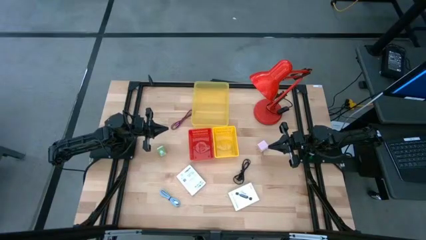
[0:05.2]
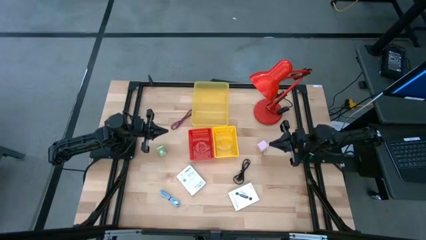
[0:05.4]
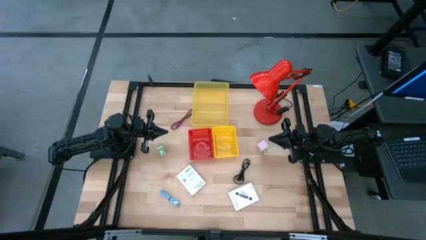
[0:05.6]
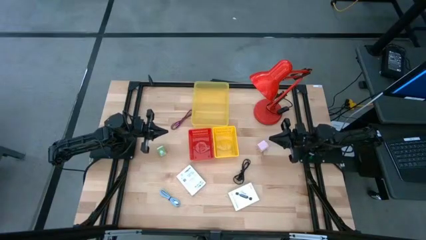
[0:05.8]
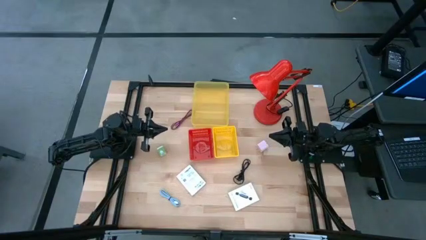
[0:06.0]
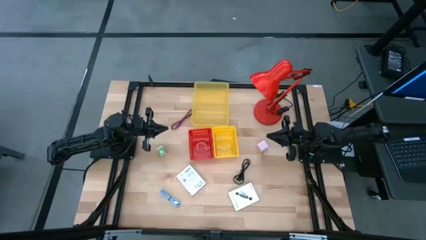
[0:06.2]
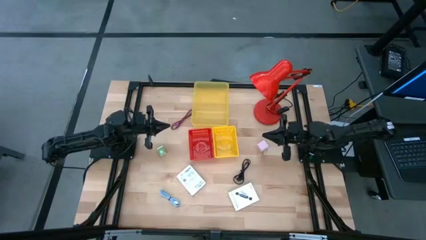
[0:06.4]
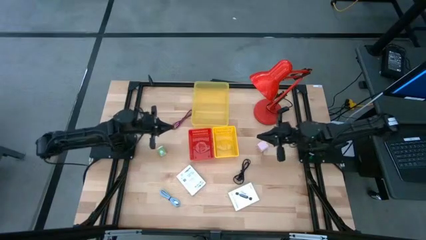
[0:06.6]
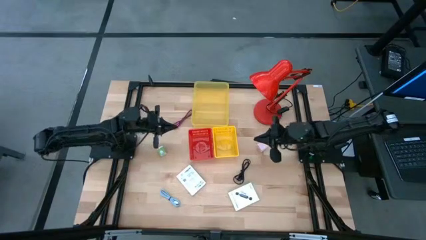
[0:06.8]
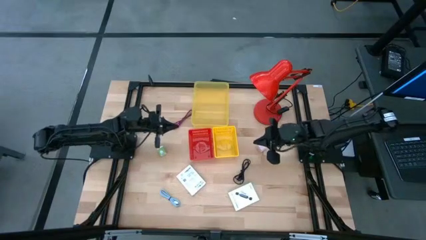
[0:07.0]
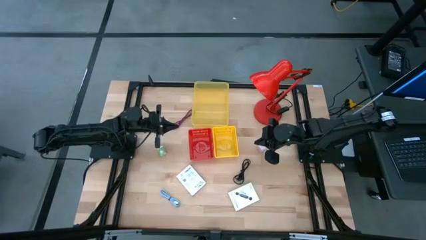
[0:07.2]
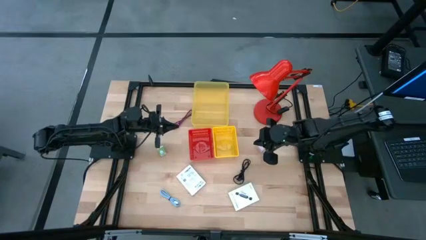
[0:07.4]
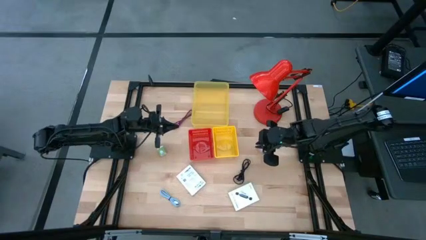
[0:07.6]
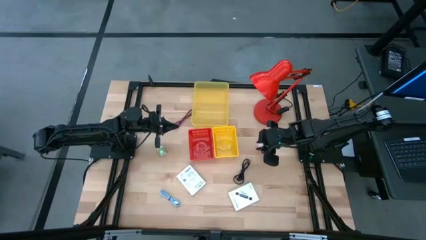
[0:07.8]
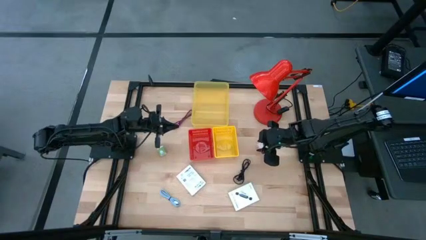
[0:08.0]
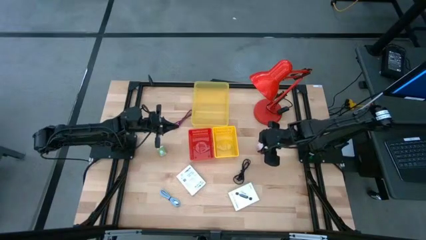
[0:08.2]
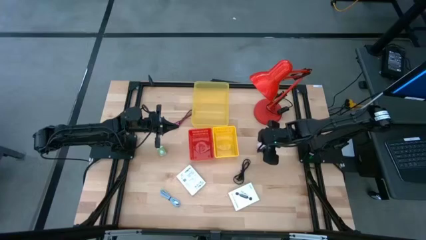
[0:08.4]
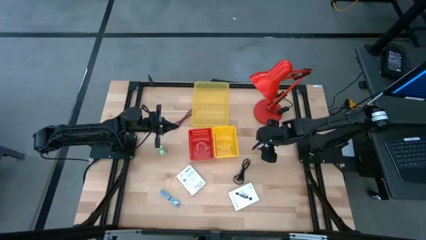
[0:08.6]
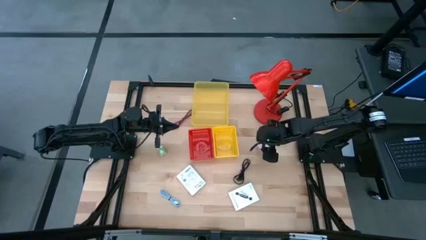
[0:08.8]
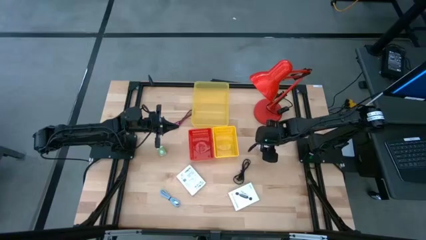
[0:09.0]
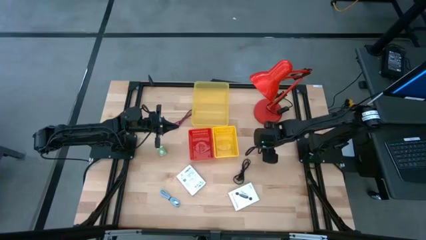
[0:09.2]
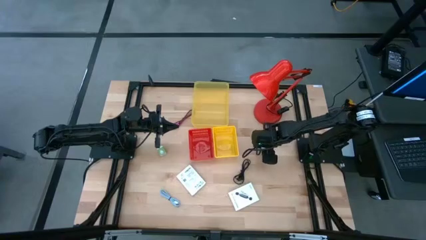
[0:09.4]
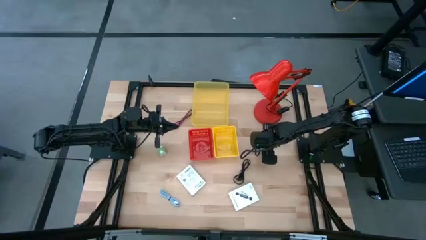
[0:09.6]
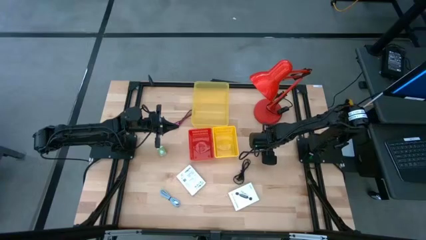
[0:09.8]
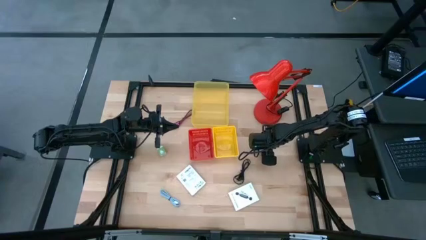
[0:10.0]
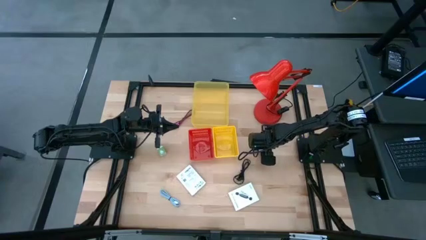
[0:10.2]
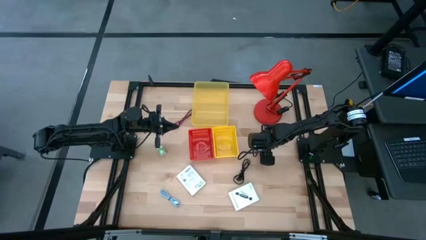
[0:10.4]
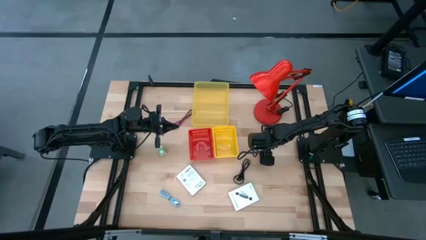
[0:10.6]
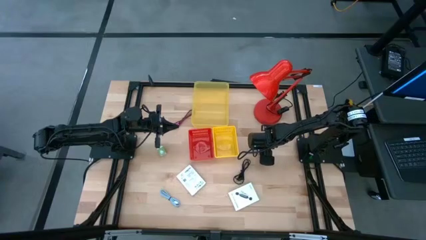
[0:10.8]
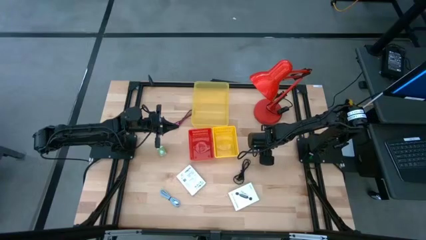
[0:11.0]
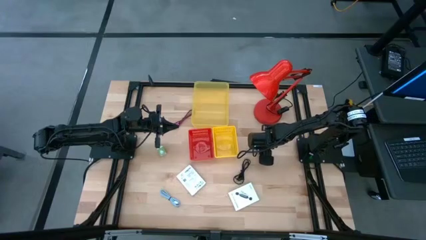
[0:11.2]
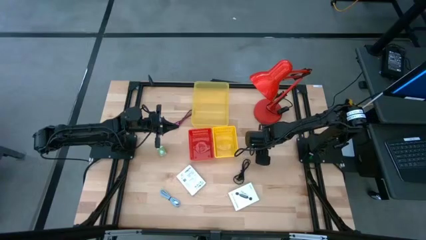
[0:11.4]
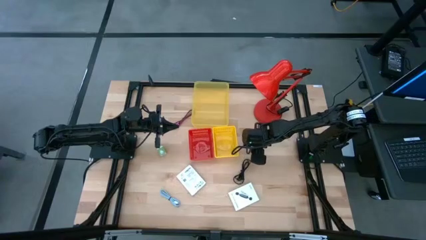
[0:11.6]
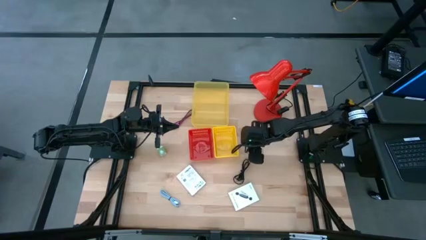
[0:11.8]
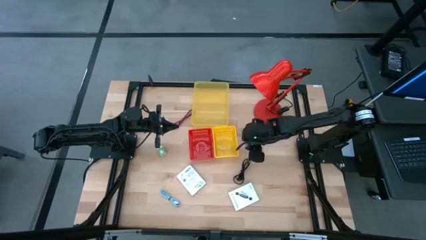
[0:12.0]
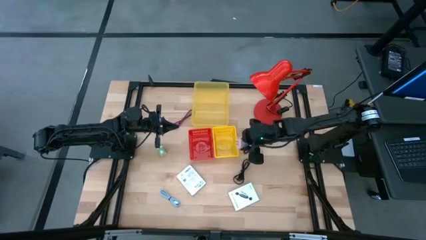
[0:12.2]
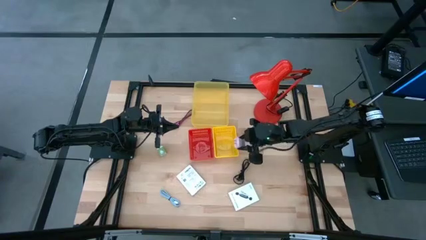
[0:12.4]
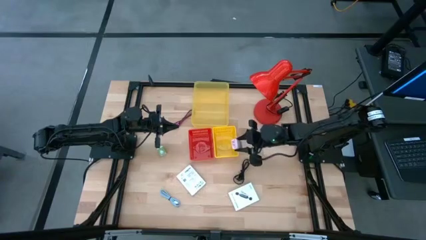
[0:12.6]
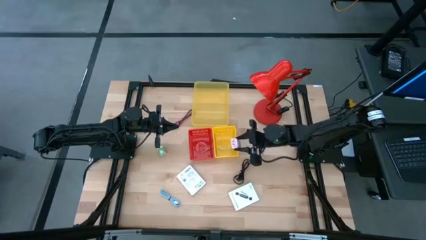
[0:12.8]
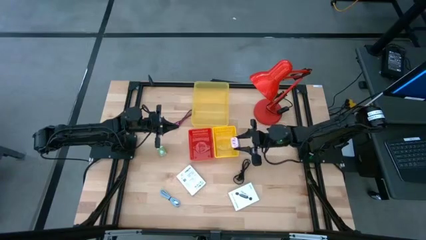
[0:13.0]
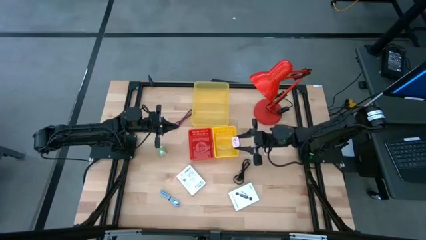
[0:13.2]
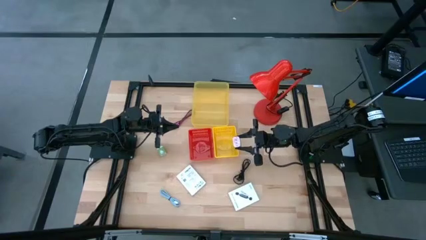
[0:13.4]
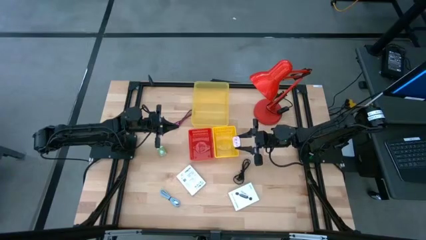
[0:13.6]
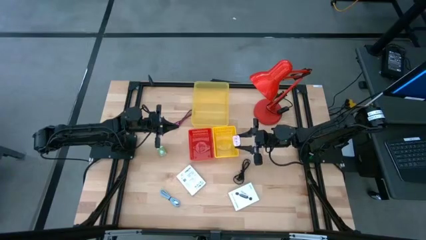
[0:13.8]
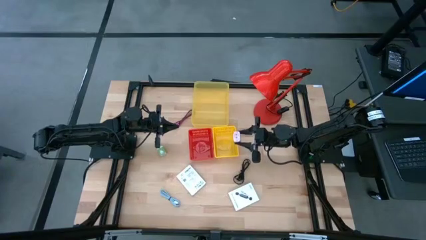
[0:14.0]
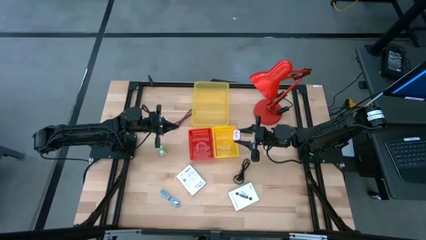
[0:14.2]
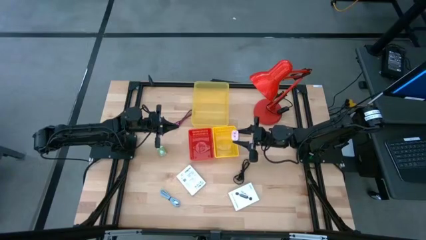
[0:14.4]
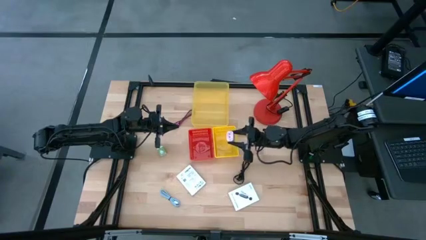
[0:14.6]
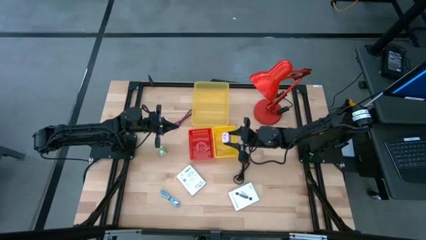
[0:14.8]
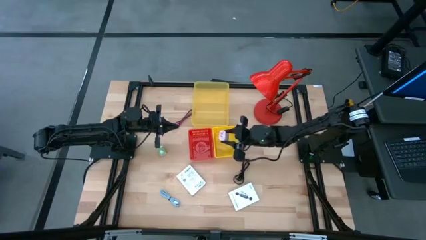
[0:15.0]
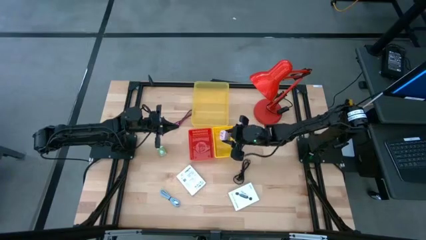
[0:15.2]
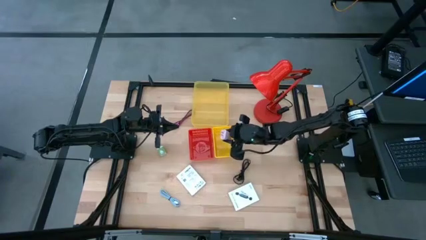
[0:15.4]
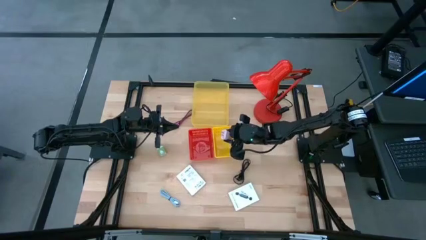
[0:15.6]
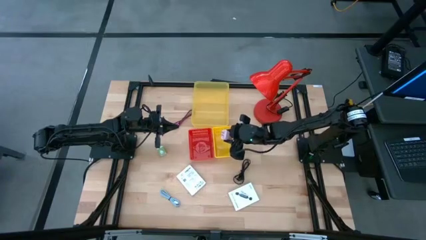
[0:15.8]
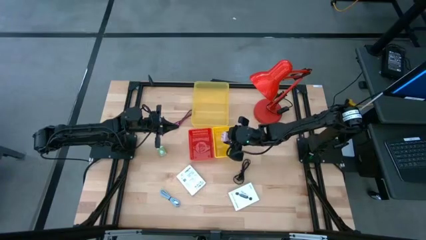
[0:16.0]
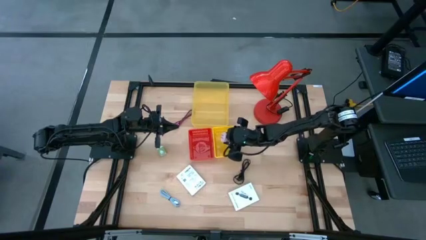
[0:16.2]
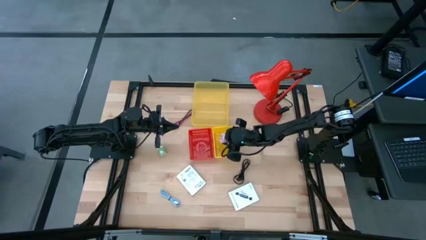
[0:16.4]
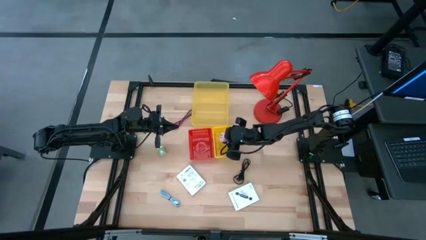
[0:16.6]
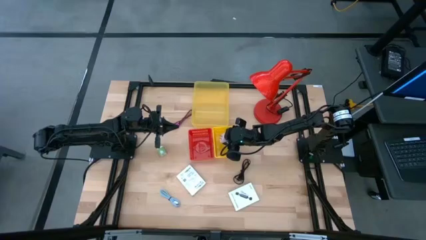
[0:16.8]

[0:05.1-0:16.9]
Task: Pick and place items into bin
Put the pink charger adapter into the bottom yellow bin
